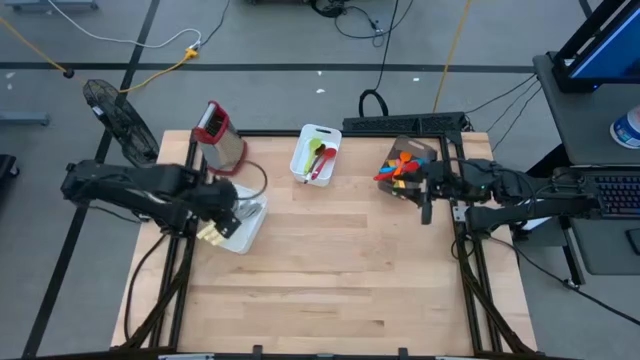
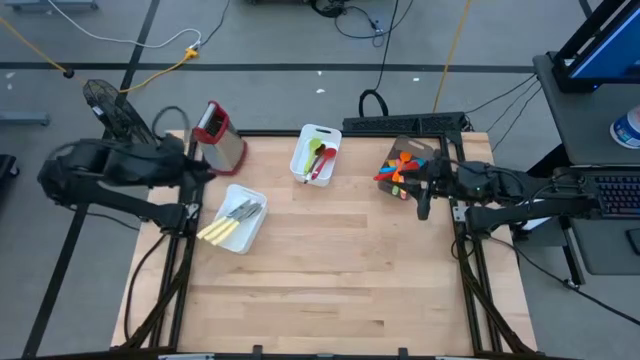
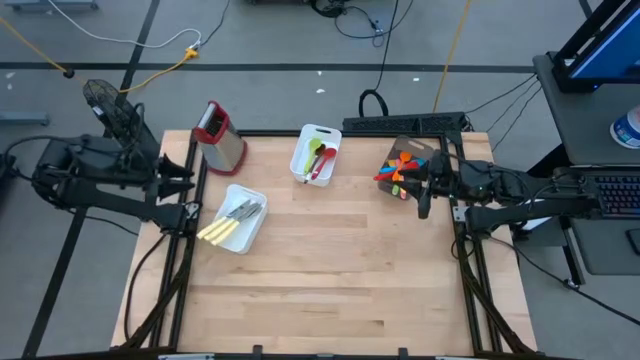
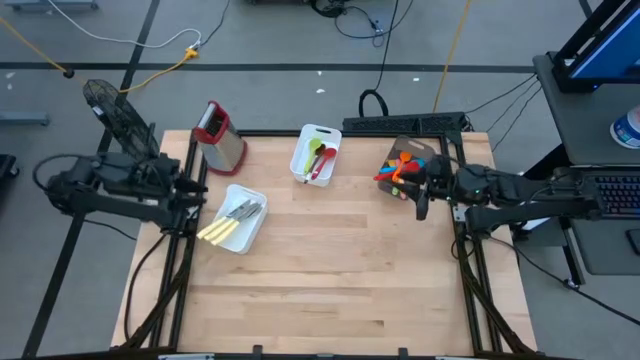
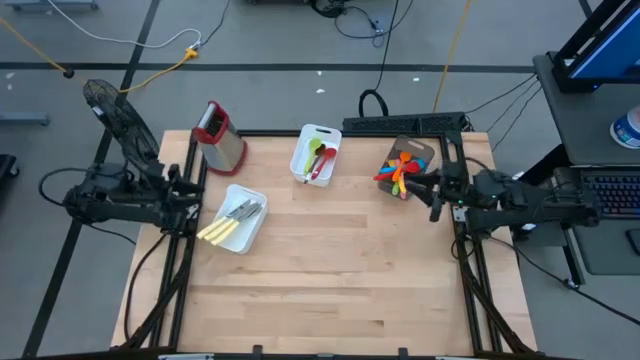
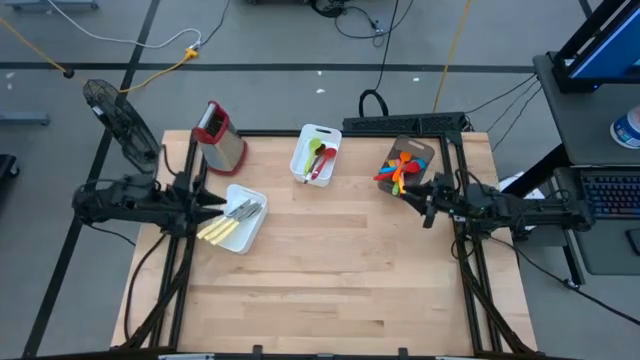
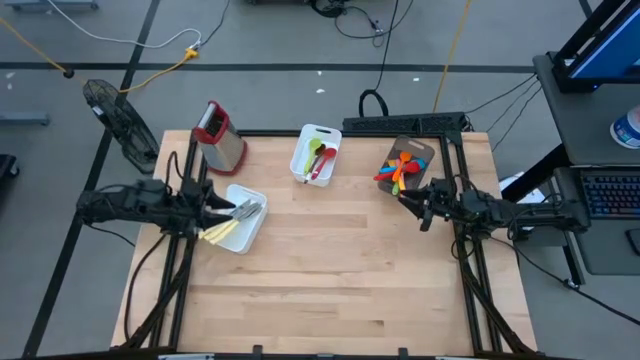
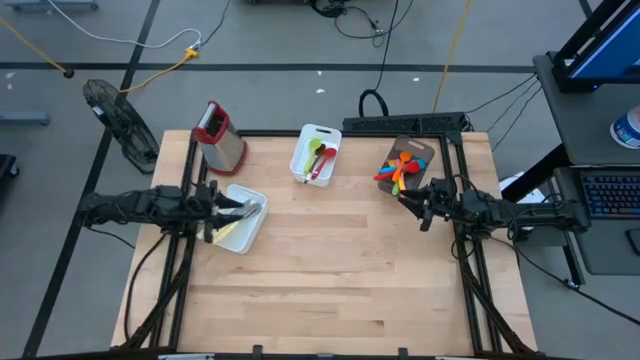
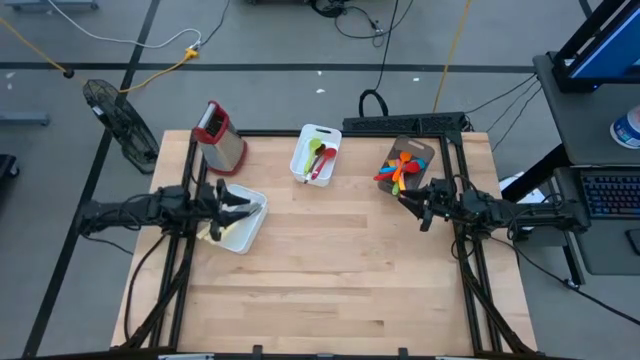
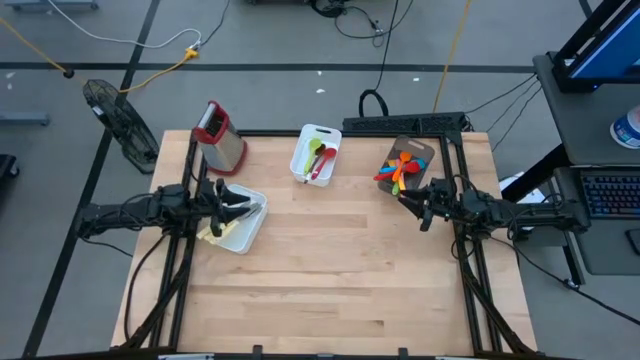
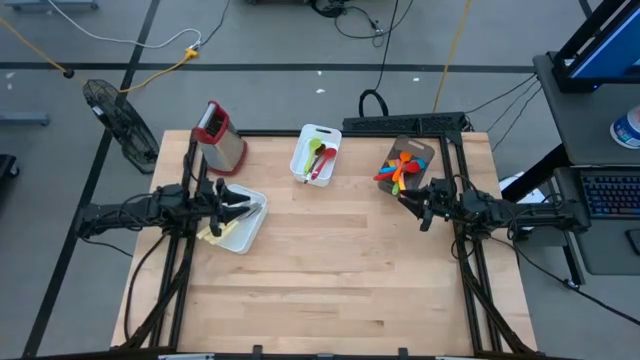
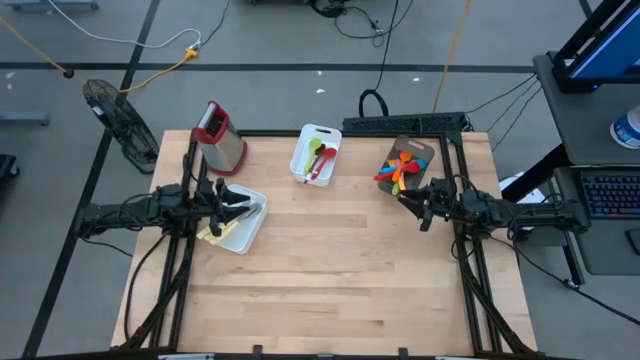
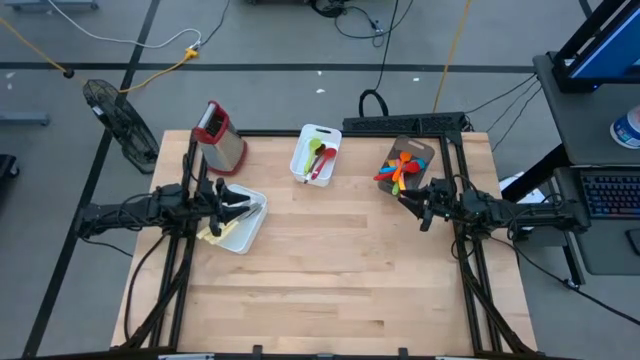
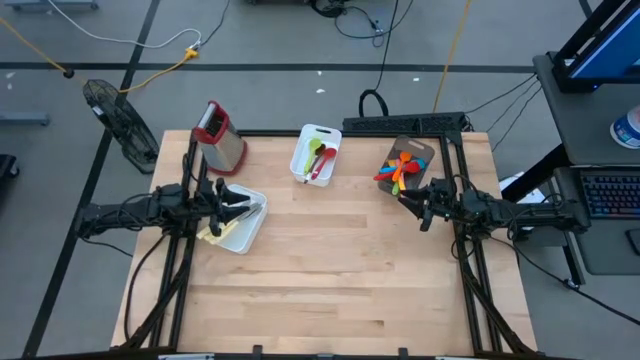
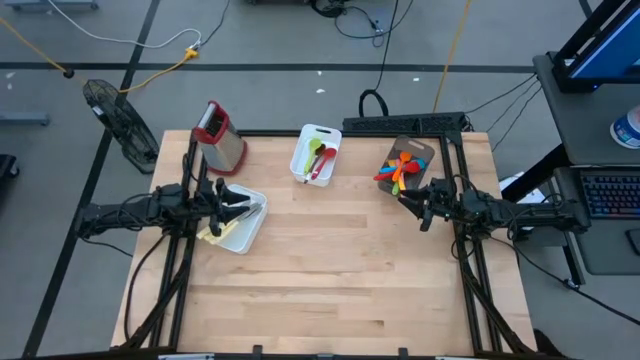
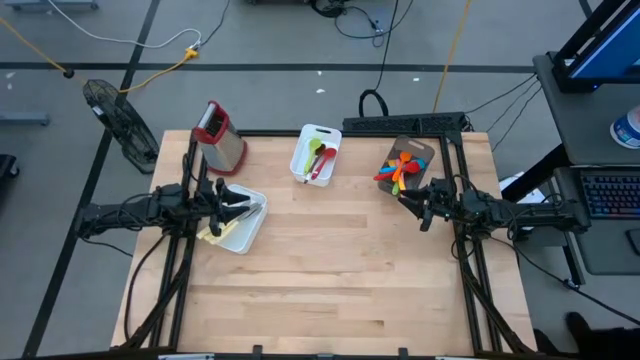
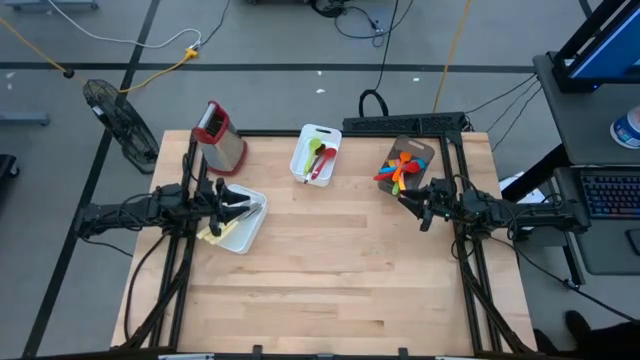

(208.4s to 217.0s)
Task: Pick & Place Kitchen Items
Return to Home Position

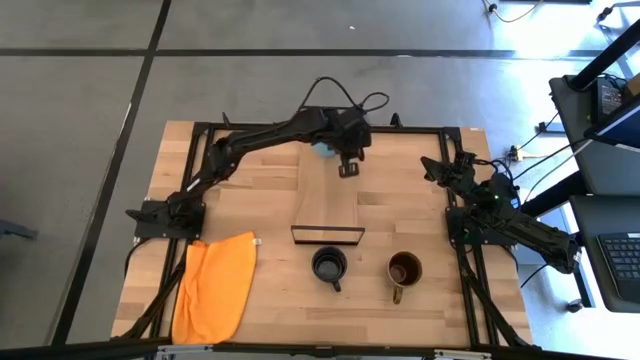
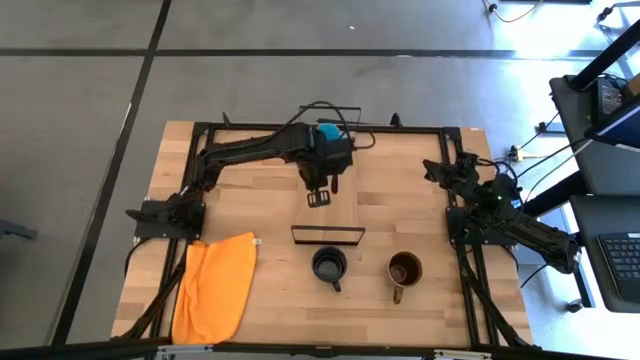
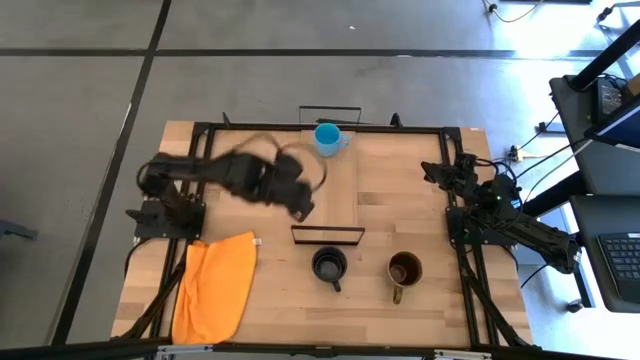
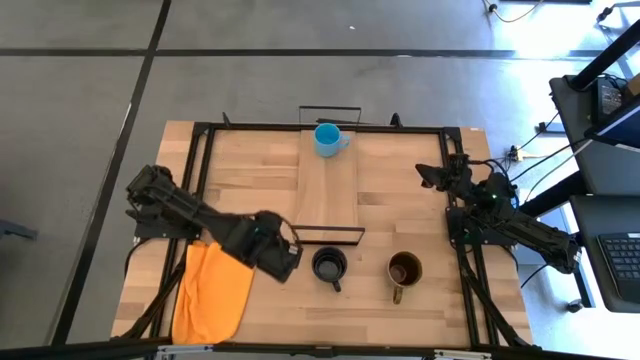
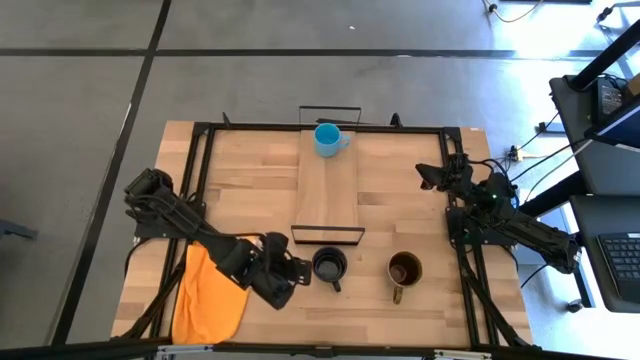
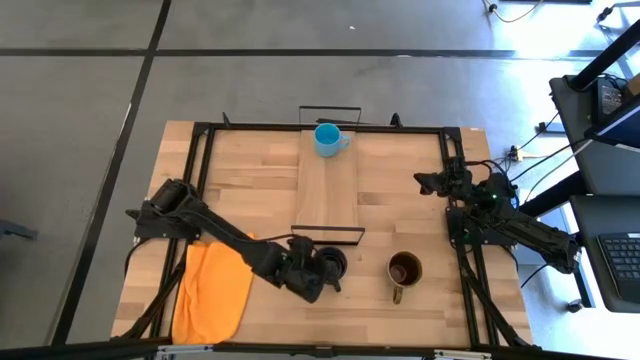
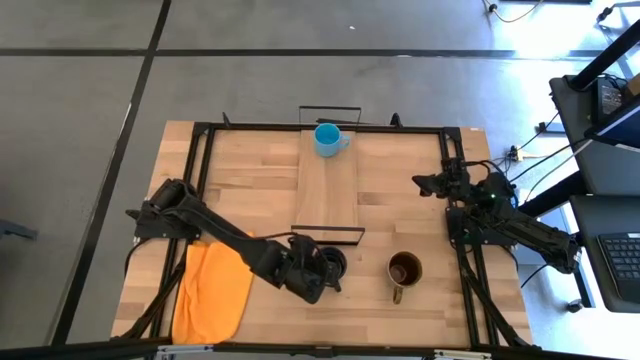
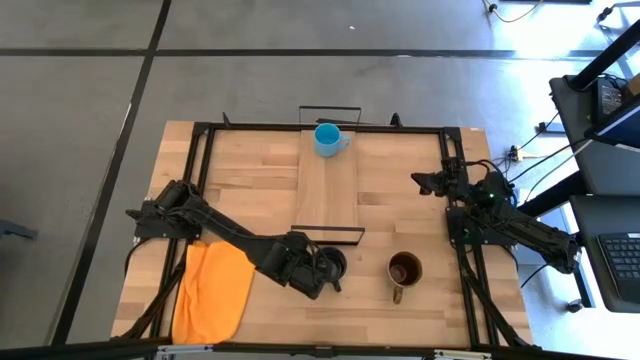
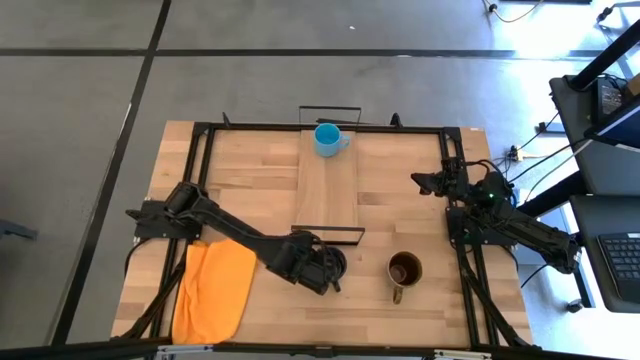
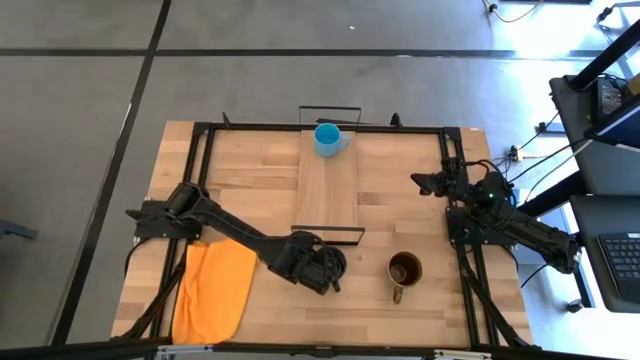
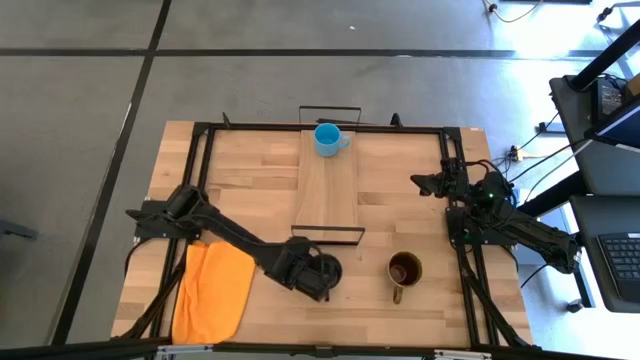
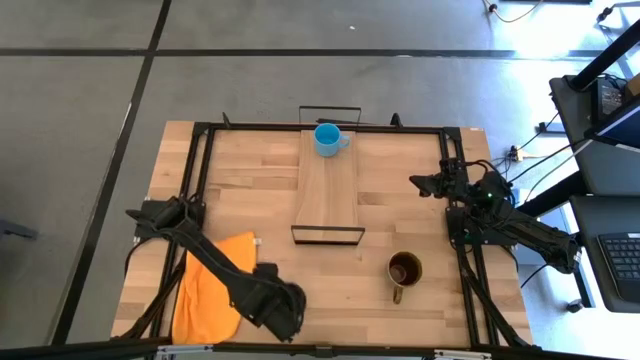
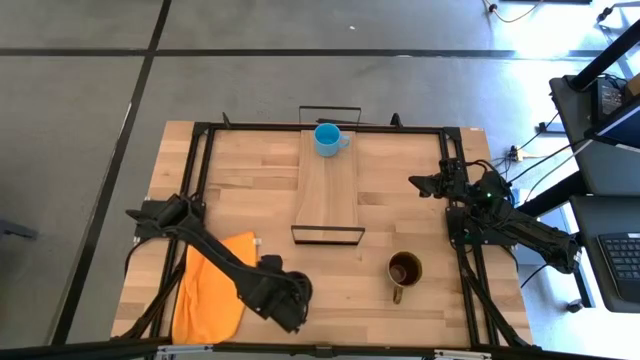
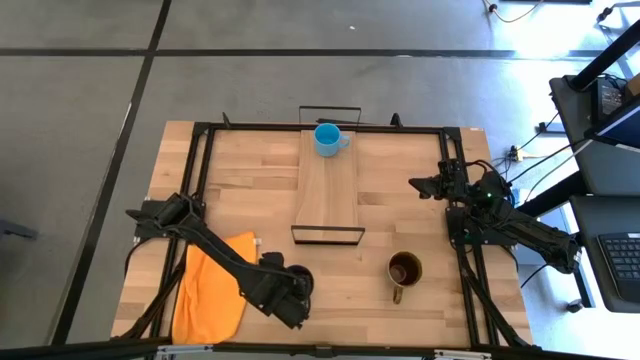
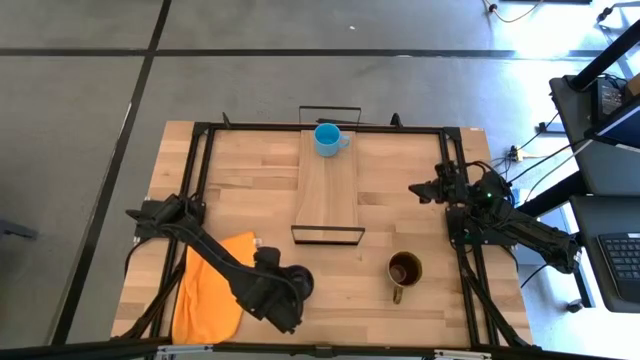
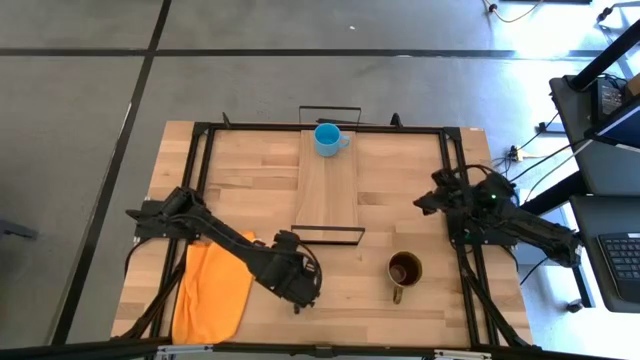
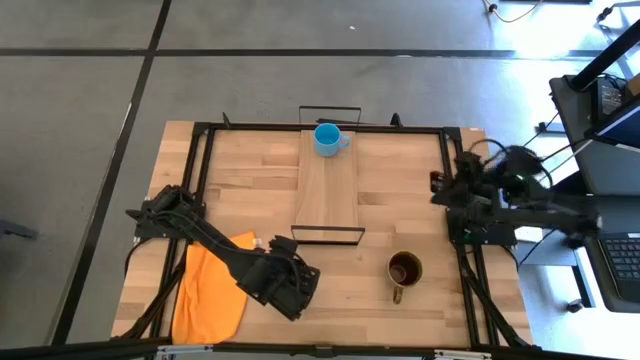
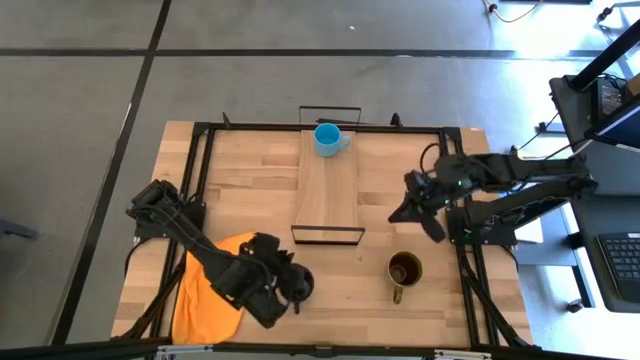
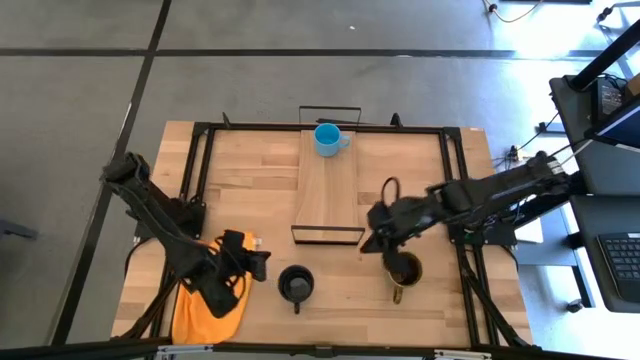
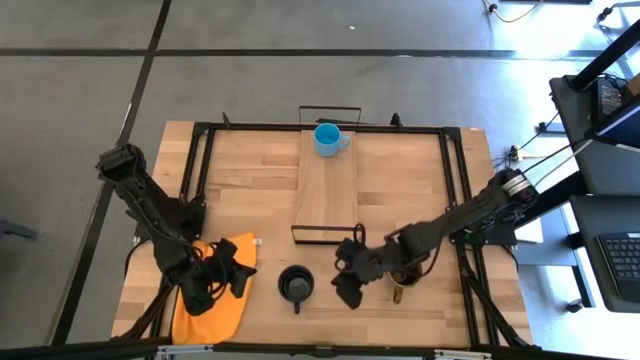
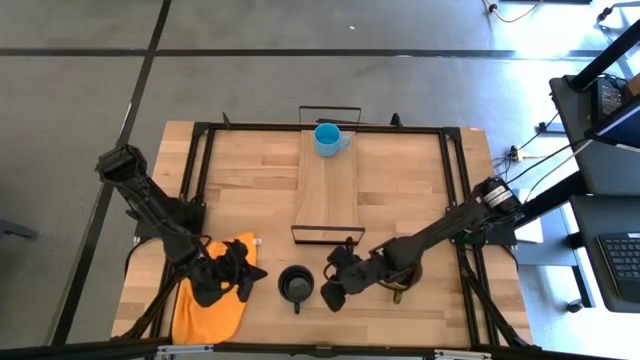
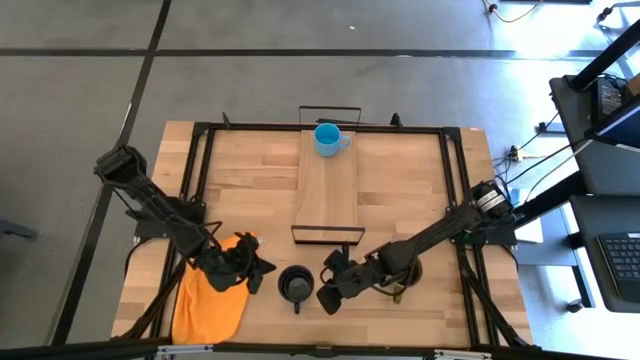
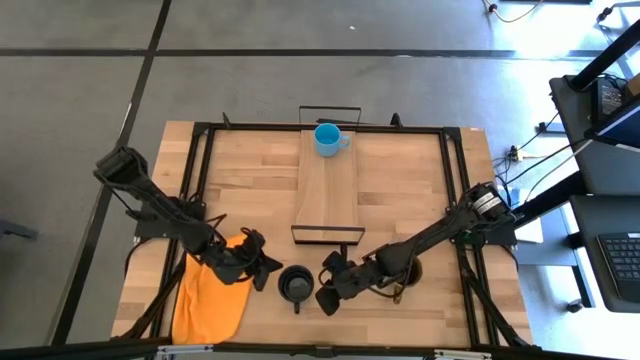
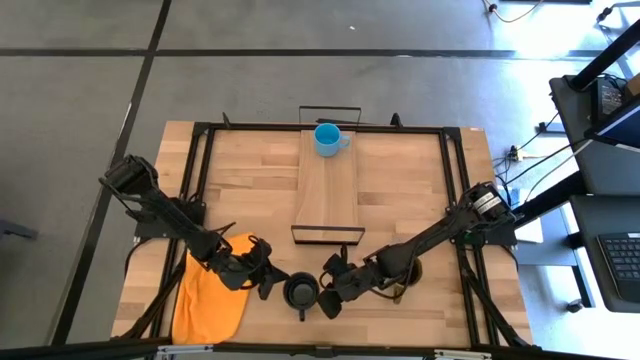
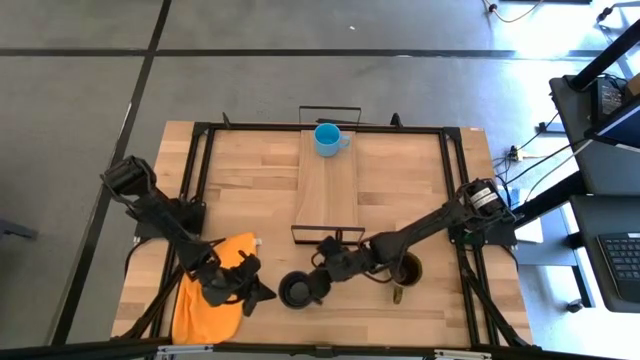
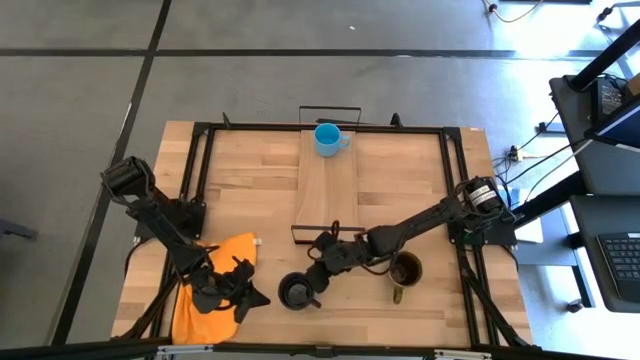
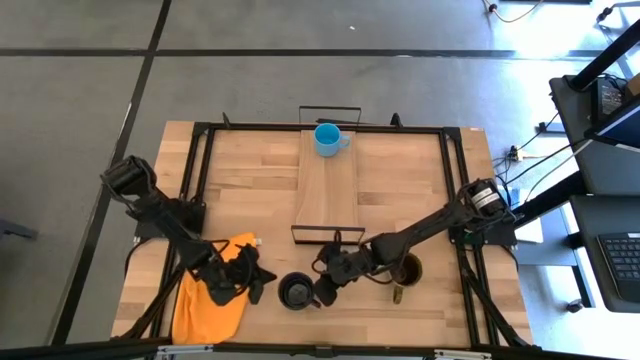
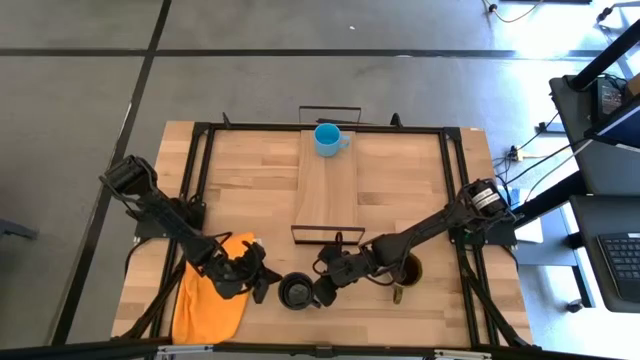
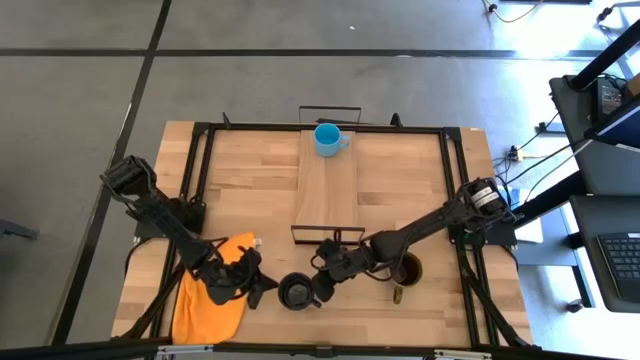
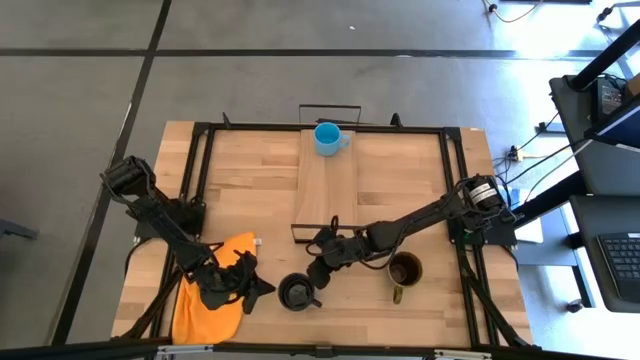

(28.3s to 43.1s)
Task: Stack small to large cups/mugs on shelf
Put the dark blue mug on the shelf
